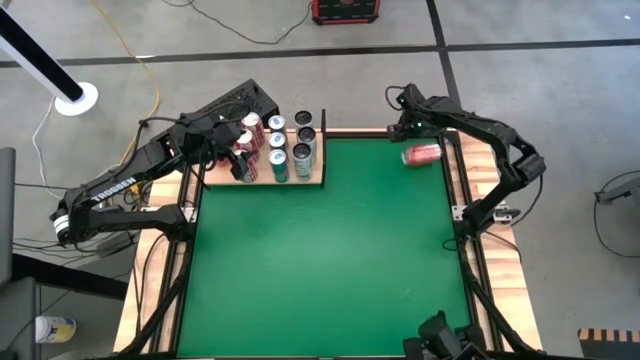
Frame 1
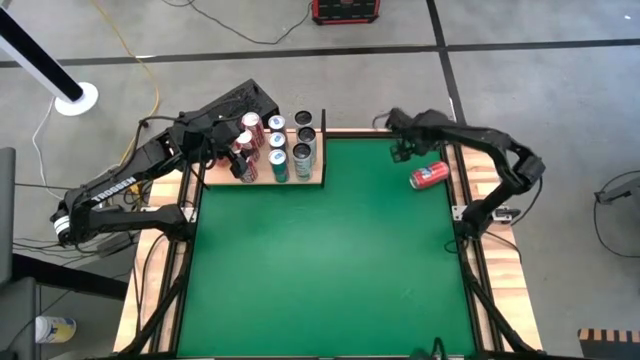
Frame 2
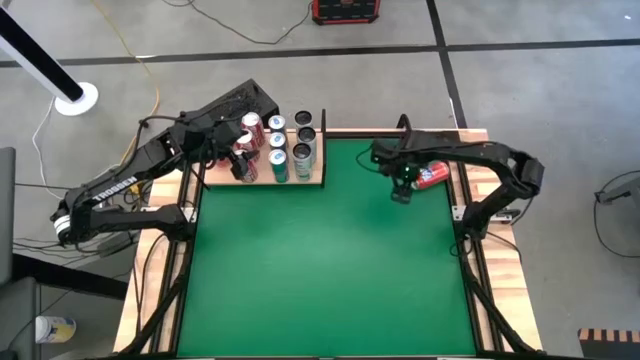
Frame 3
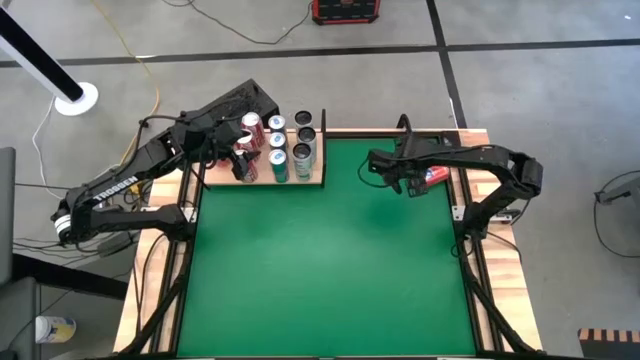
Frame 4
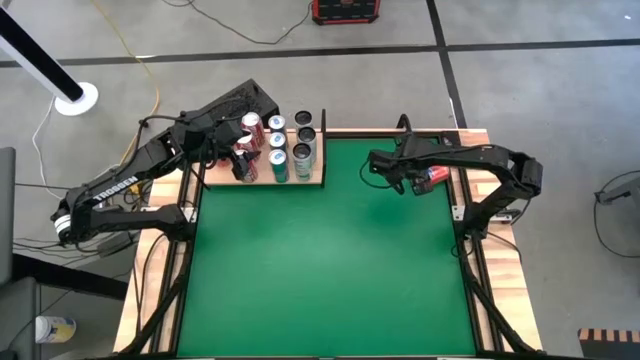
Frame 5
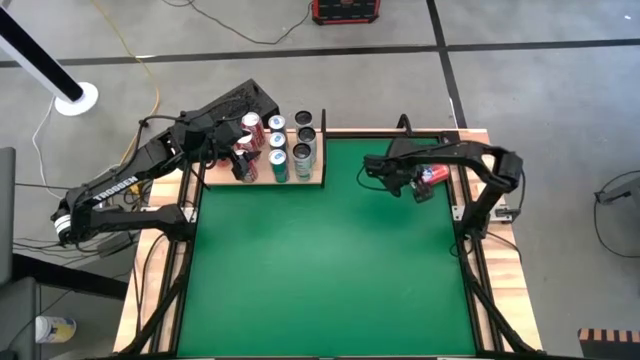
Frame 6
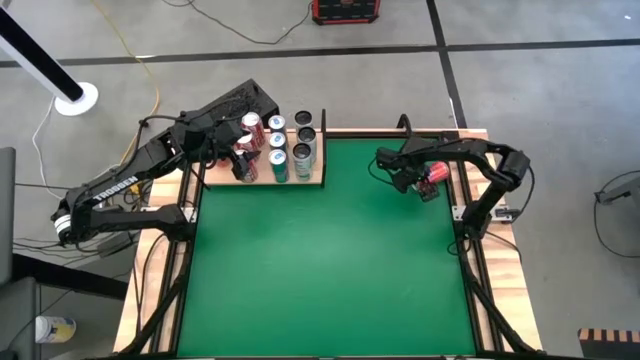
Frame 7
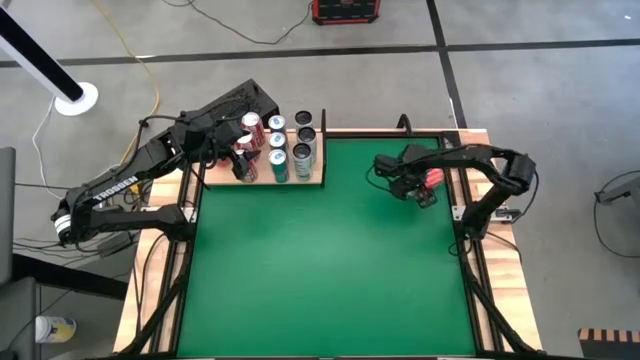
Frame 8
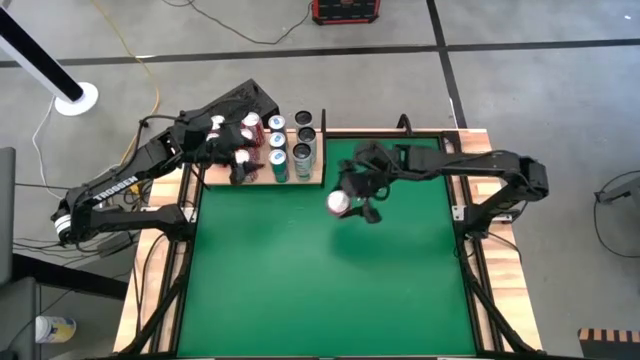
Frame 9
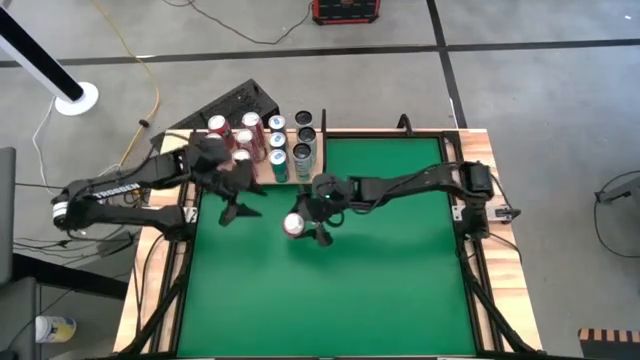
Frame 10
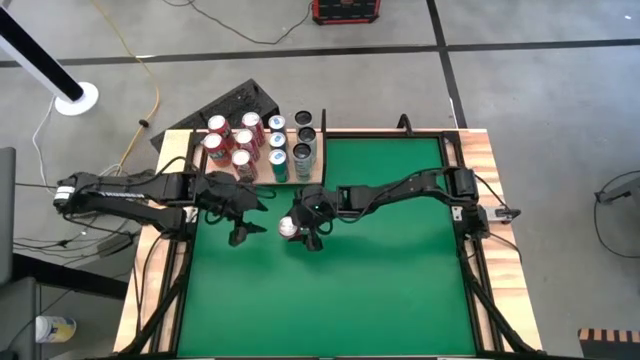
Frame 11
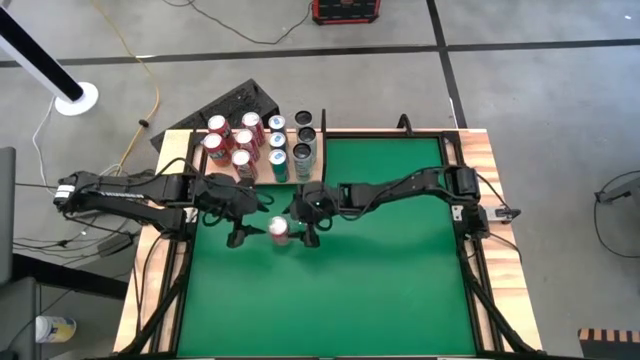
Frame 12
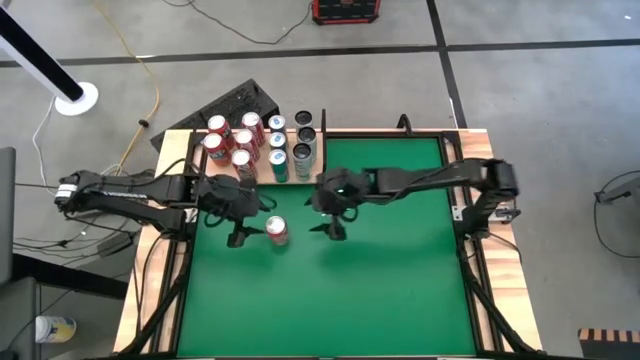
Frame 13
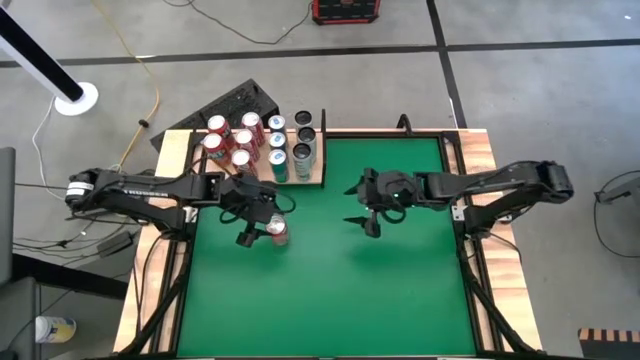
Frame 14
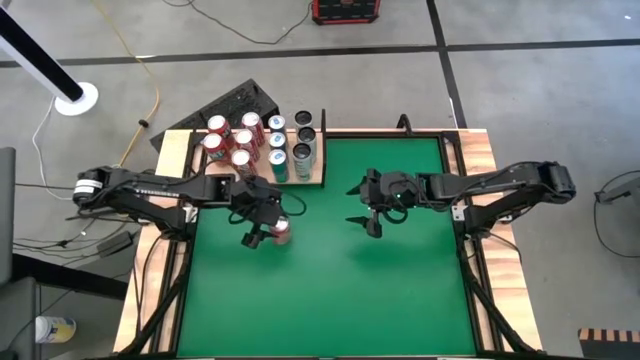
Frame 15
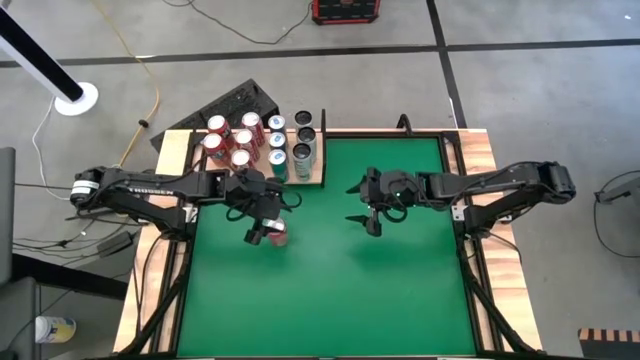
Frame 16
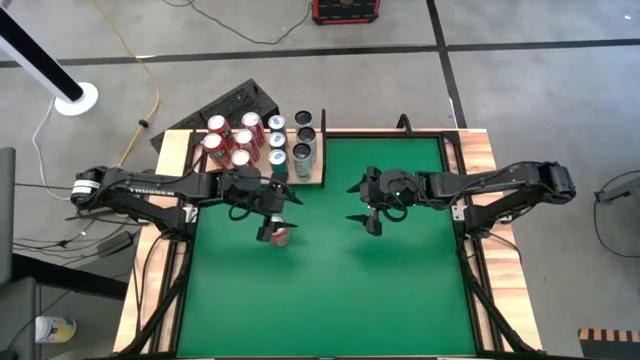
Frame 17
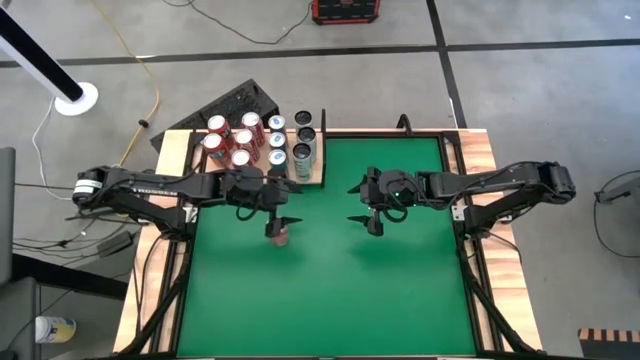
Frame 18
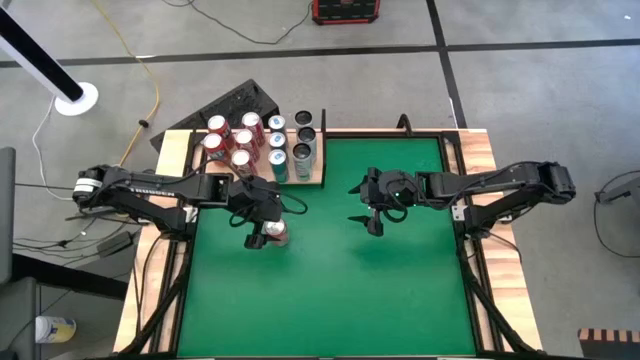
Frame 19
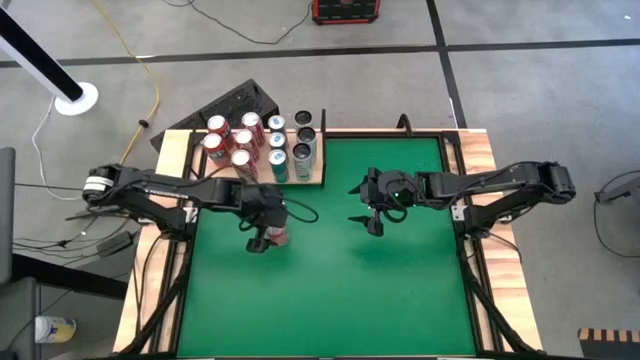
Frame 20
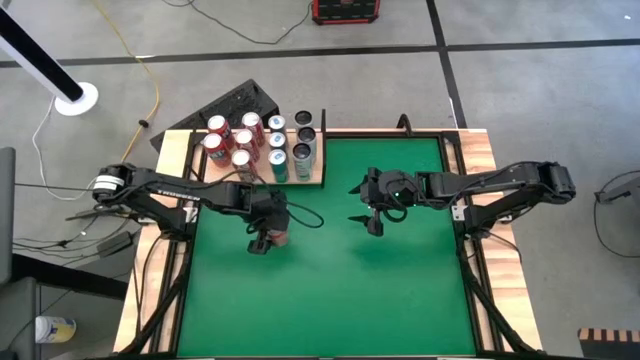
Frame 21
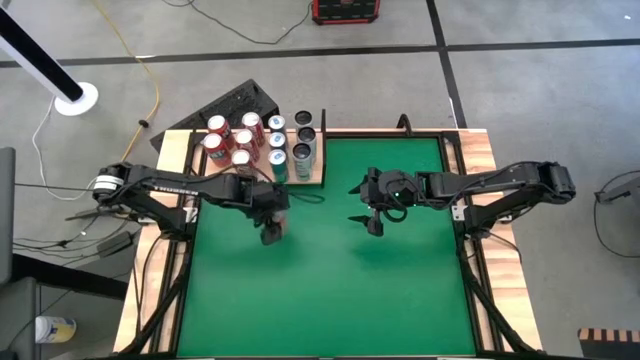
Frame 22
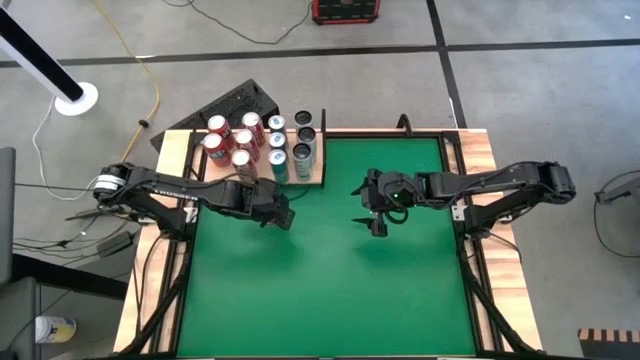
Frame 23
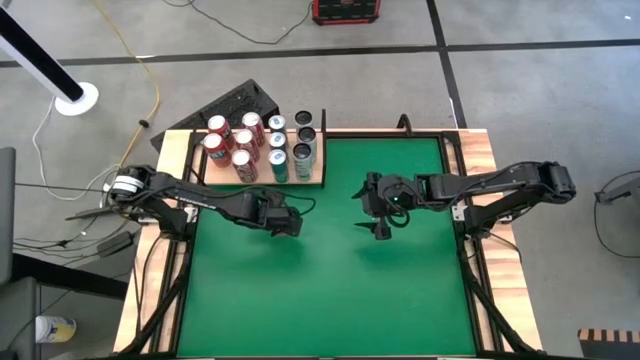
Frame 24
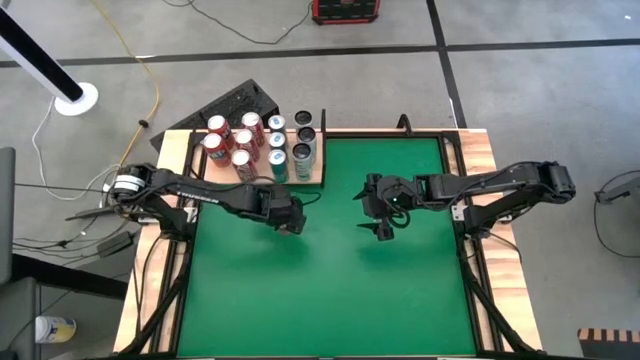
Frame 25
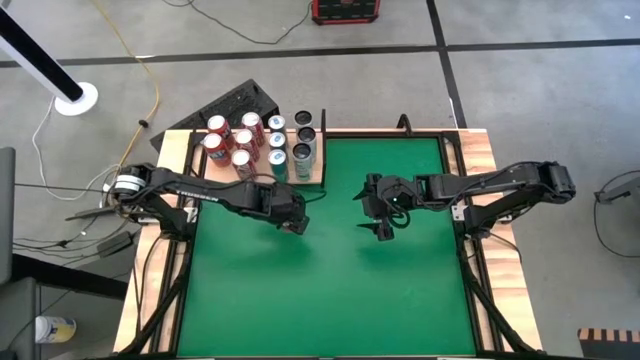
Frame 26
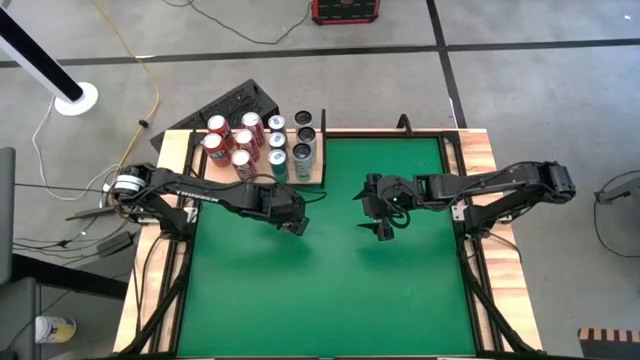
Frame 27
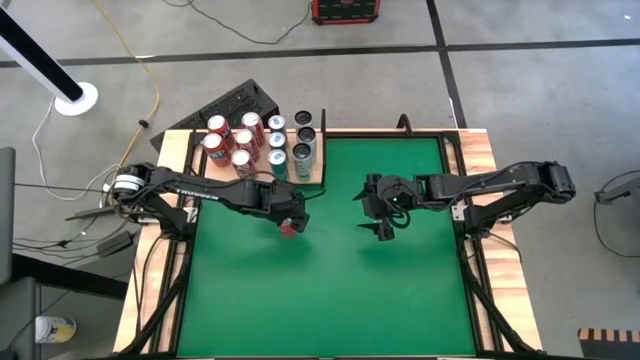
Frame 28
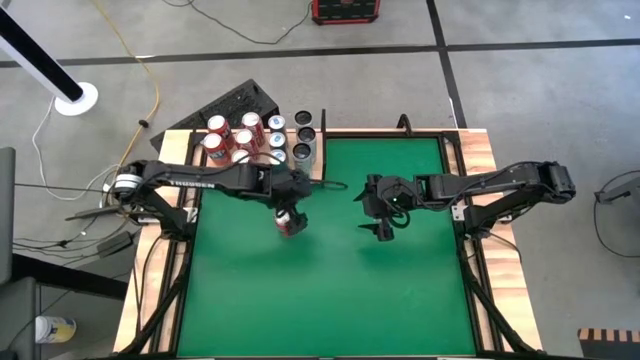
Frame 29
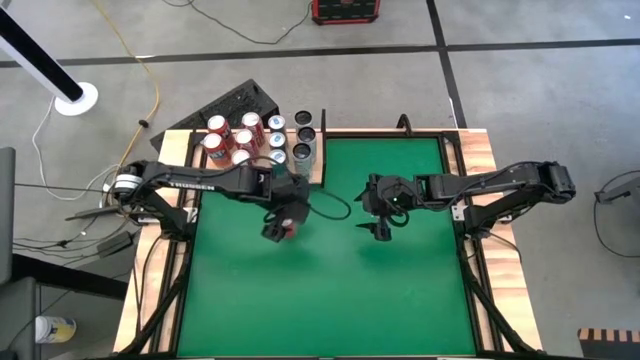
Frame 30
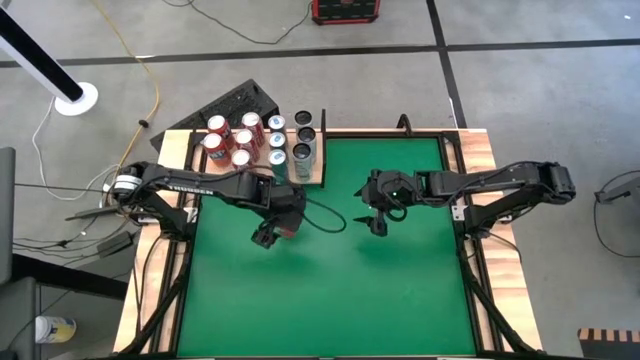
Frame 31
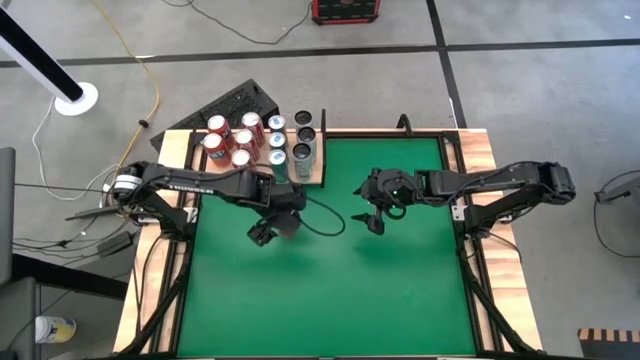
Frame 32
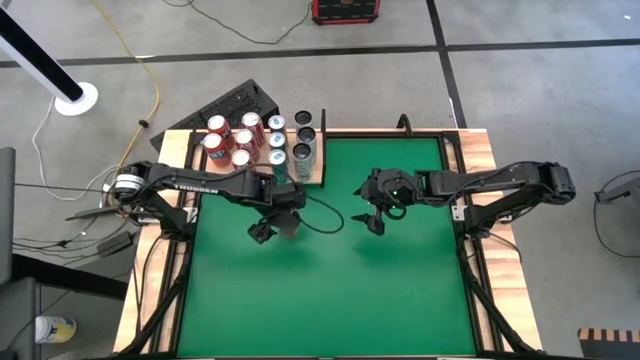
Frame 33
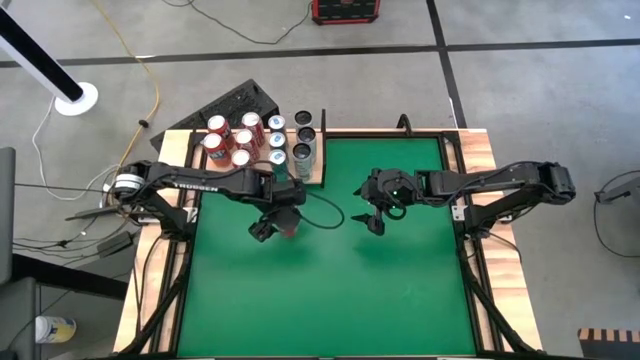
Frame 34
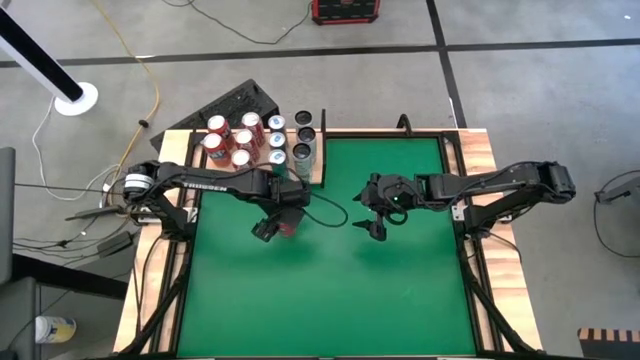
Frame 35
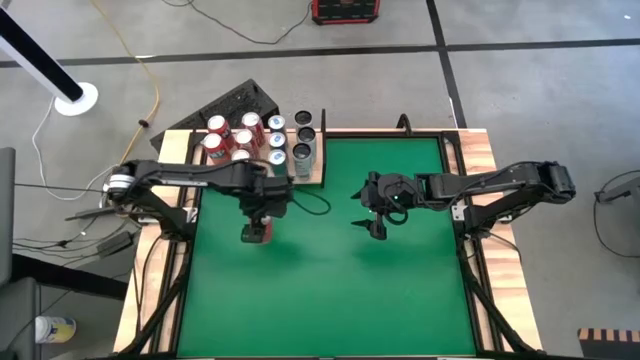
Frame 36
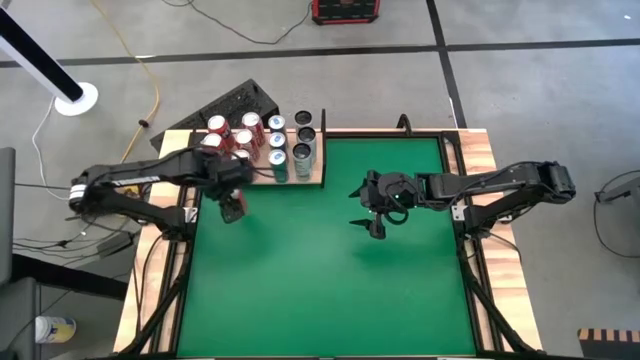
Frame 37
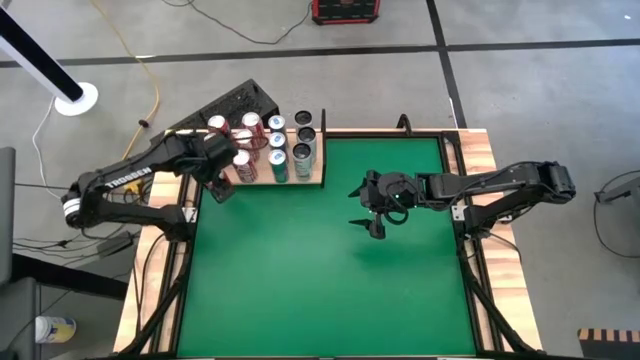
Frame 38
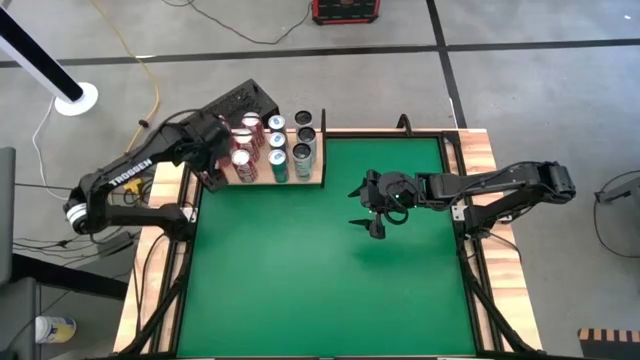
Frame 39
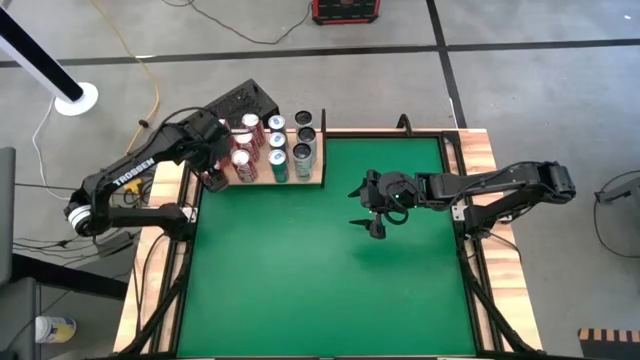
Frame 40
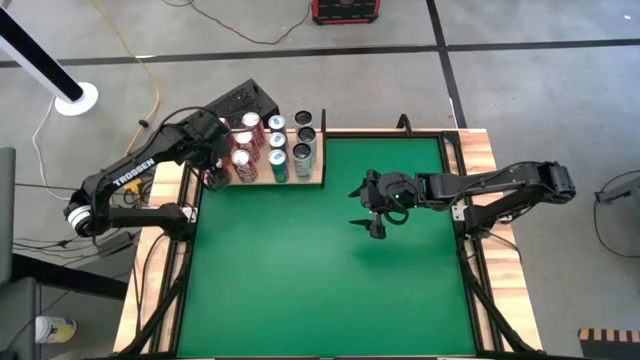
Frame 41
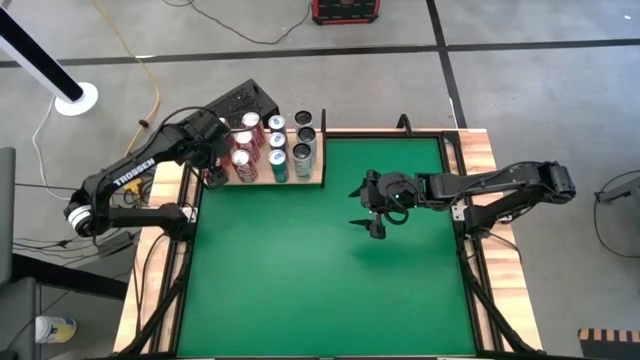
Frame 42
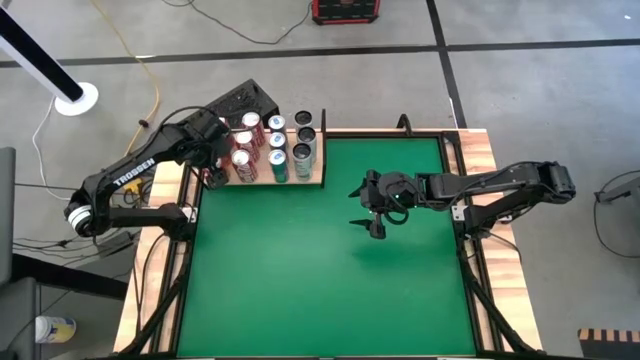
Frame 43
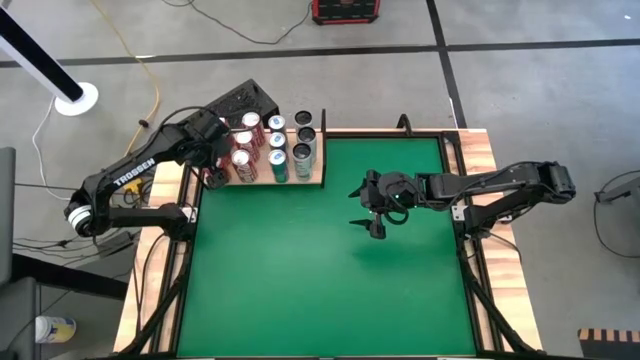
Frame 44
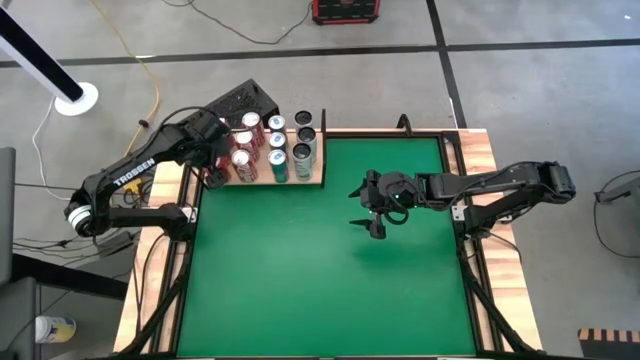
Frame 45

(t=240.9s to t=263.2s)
Task: Place canned beverage on shelf
Put the red soda can on the shelf aligned with the other red soda cans
